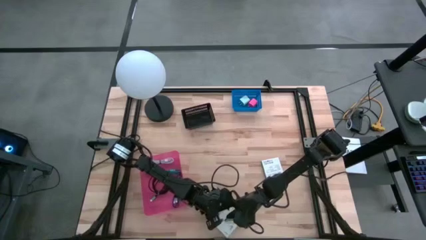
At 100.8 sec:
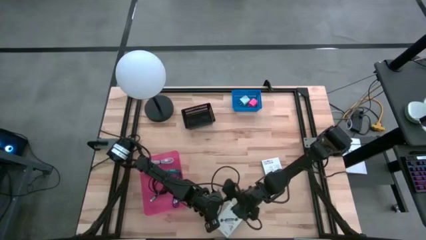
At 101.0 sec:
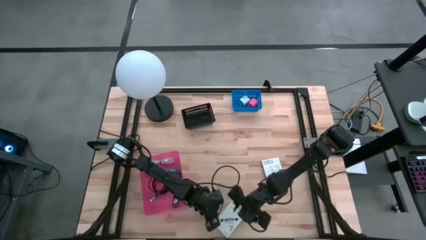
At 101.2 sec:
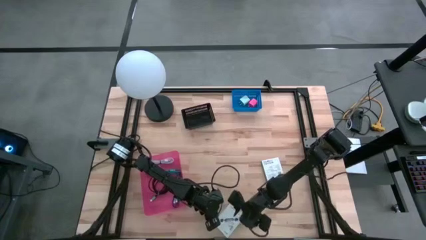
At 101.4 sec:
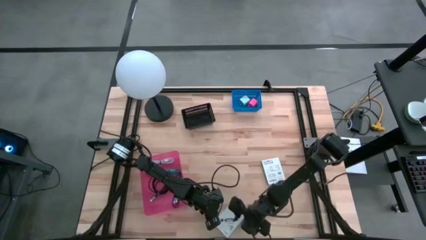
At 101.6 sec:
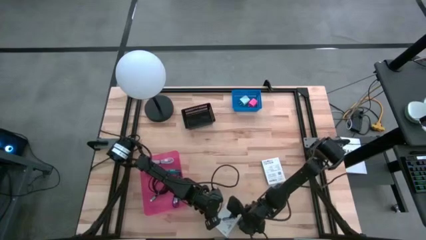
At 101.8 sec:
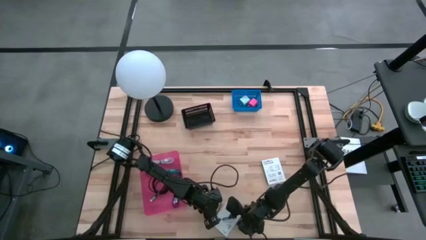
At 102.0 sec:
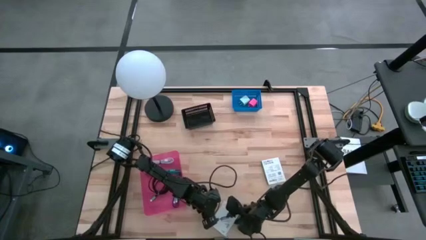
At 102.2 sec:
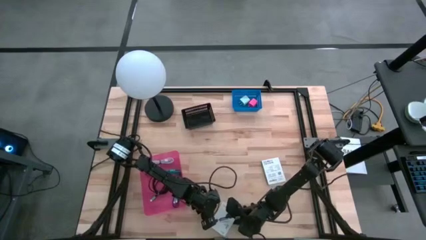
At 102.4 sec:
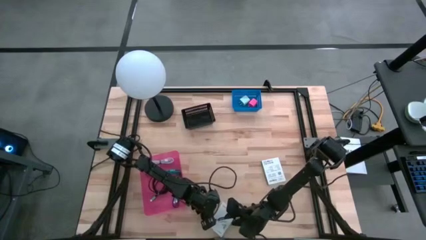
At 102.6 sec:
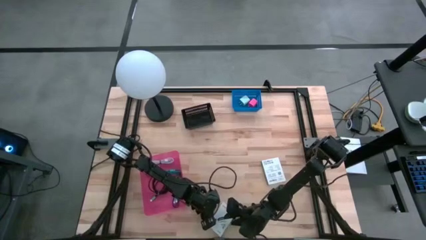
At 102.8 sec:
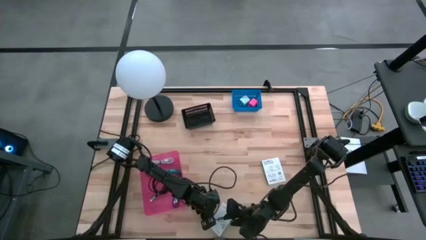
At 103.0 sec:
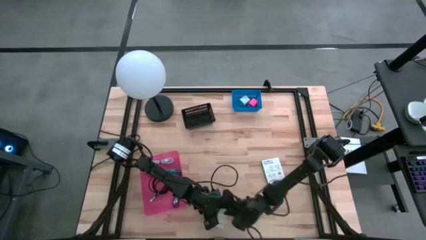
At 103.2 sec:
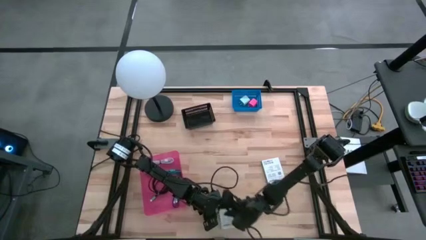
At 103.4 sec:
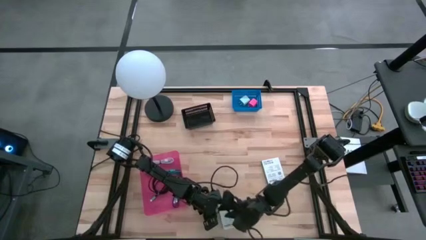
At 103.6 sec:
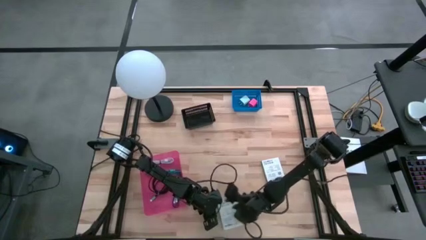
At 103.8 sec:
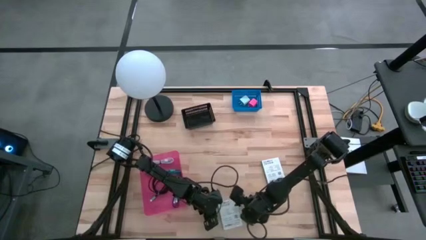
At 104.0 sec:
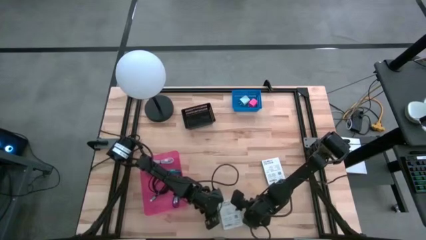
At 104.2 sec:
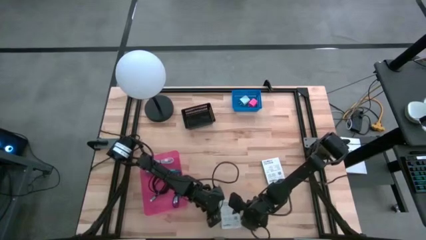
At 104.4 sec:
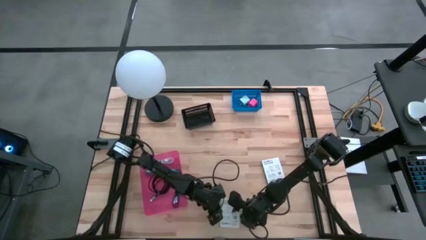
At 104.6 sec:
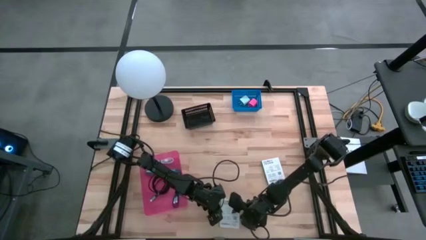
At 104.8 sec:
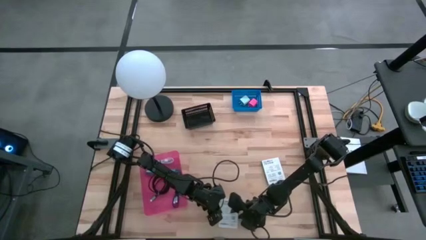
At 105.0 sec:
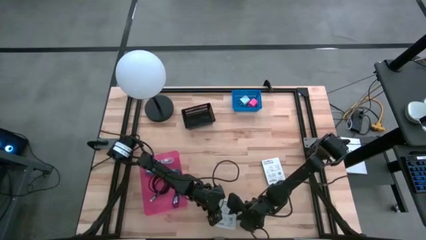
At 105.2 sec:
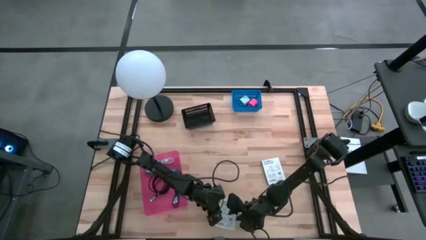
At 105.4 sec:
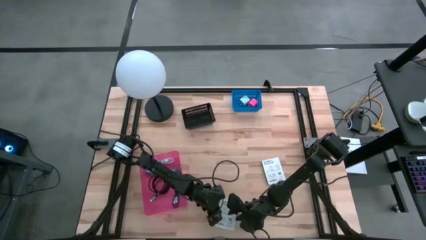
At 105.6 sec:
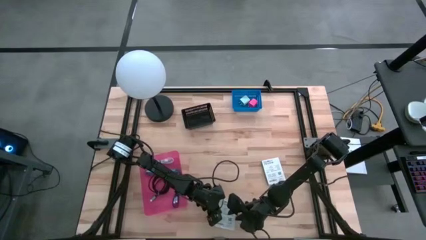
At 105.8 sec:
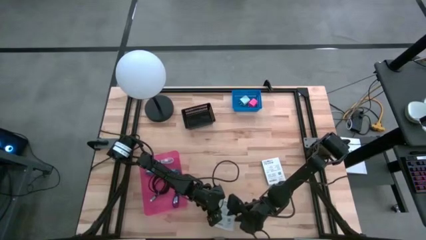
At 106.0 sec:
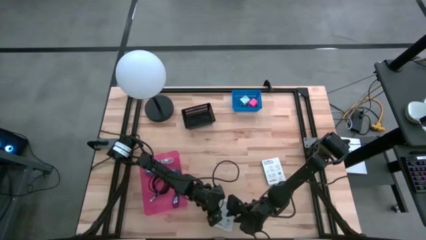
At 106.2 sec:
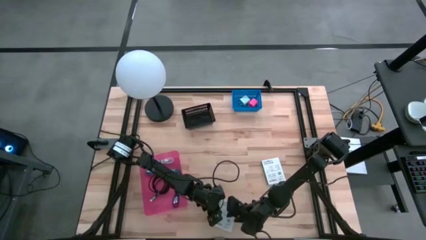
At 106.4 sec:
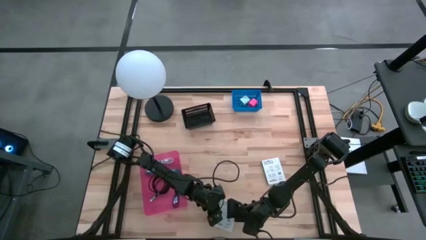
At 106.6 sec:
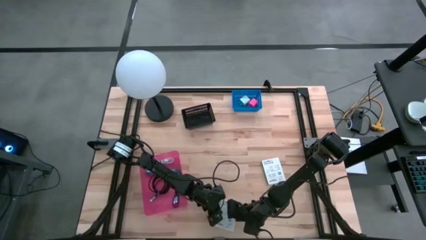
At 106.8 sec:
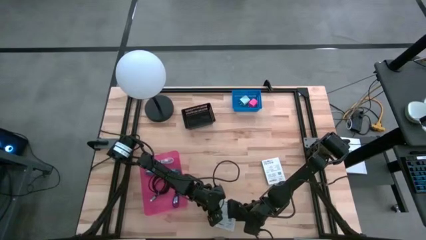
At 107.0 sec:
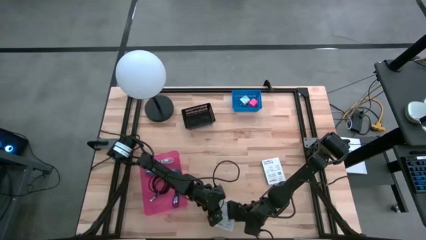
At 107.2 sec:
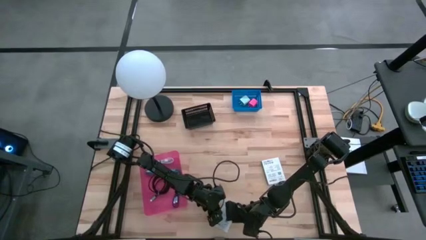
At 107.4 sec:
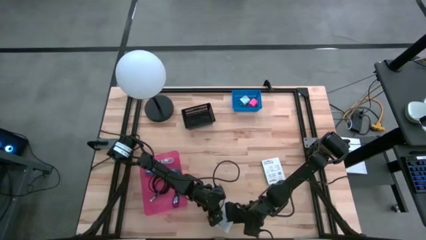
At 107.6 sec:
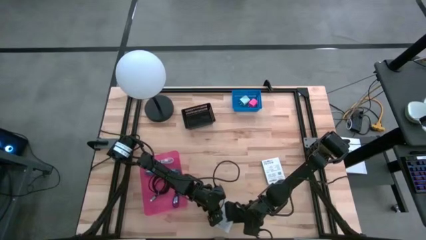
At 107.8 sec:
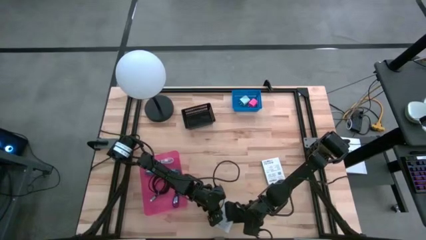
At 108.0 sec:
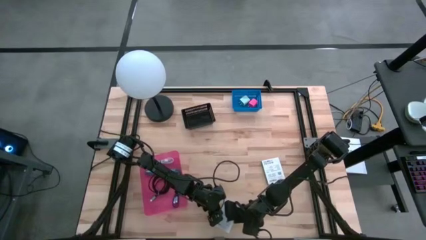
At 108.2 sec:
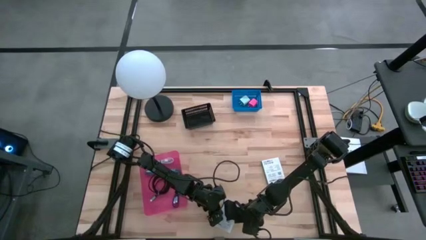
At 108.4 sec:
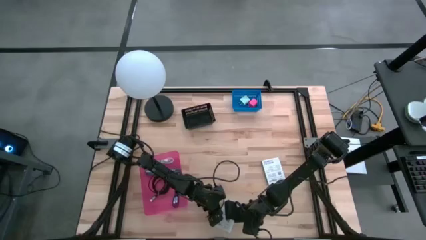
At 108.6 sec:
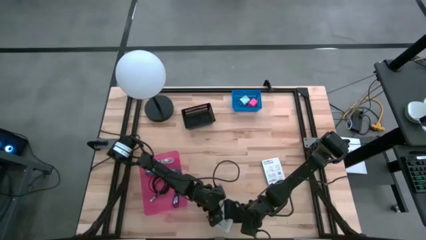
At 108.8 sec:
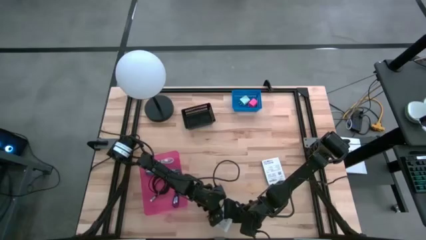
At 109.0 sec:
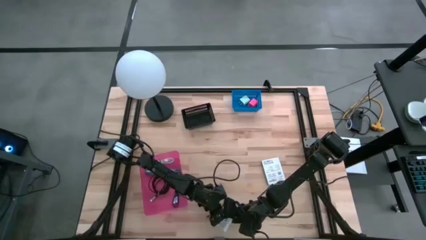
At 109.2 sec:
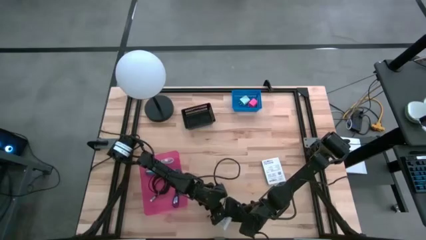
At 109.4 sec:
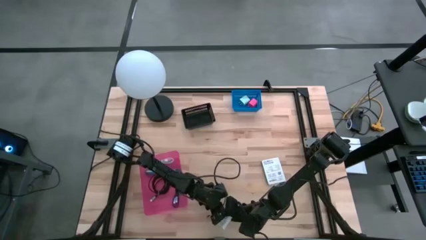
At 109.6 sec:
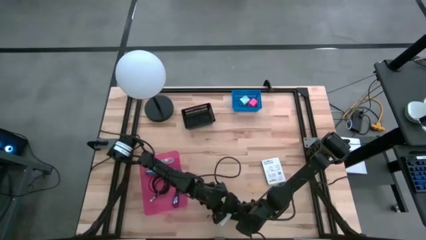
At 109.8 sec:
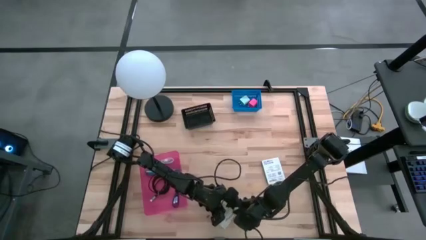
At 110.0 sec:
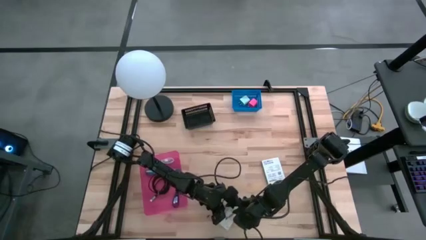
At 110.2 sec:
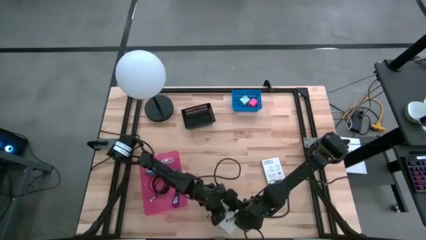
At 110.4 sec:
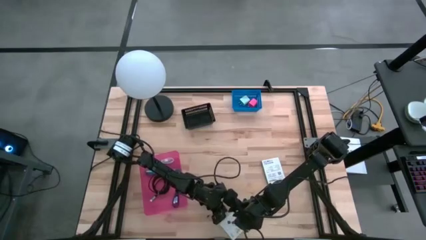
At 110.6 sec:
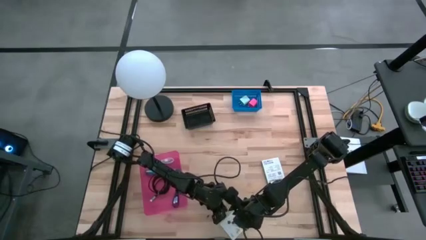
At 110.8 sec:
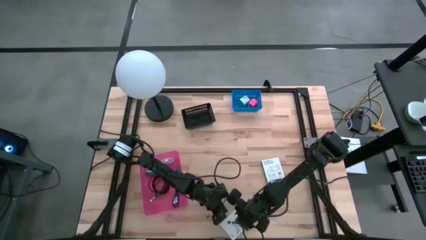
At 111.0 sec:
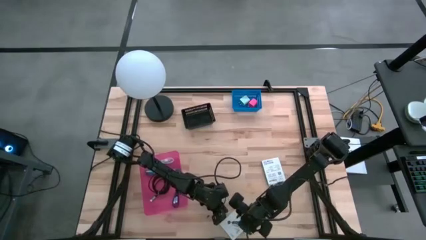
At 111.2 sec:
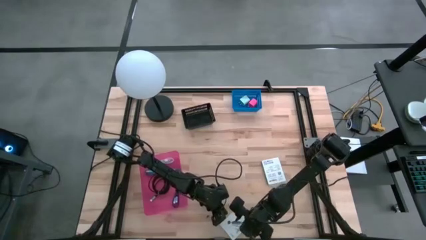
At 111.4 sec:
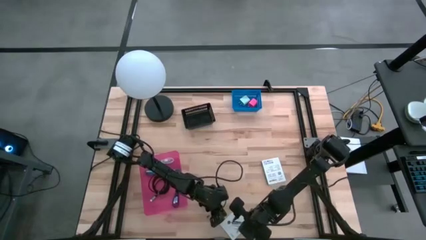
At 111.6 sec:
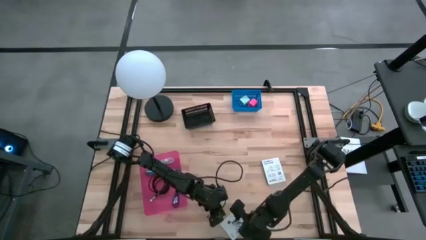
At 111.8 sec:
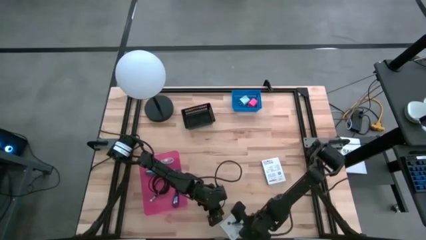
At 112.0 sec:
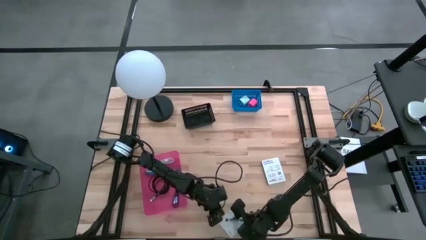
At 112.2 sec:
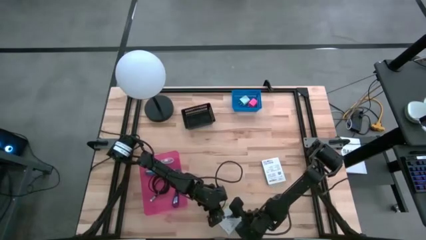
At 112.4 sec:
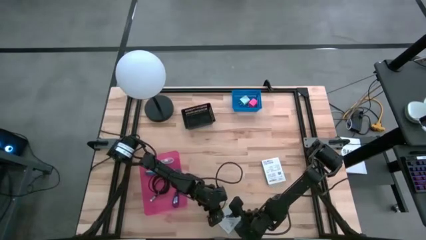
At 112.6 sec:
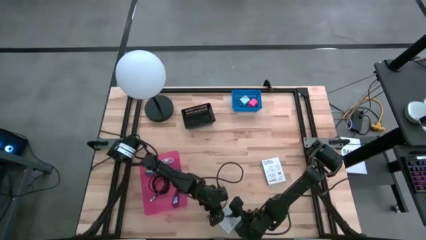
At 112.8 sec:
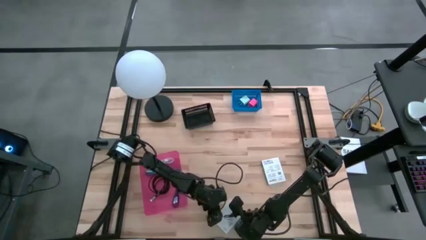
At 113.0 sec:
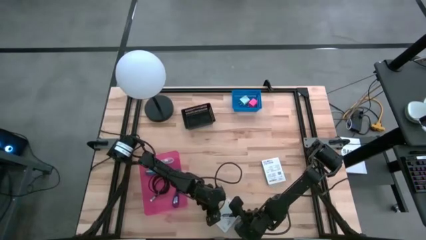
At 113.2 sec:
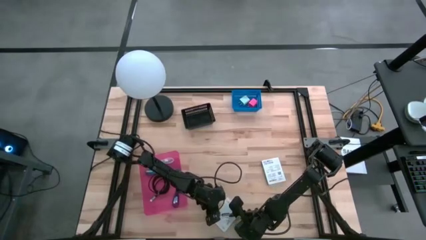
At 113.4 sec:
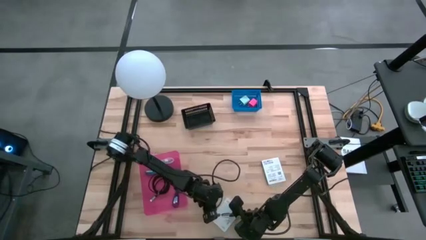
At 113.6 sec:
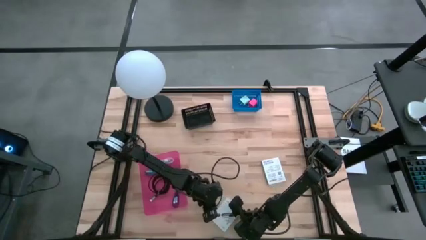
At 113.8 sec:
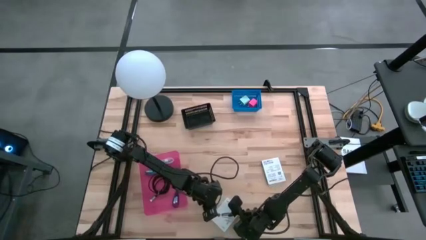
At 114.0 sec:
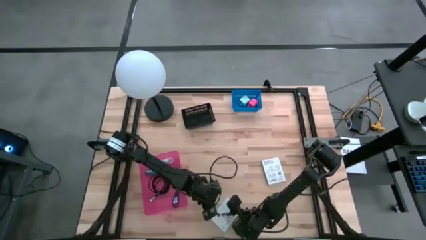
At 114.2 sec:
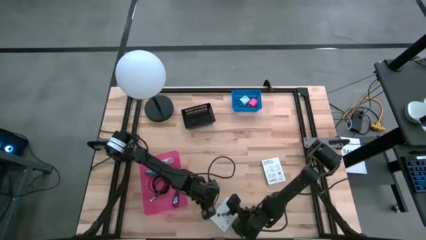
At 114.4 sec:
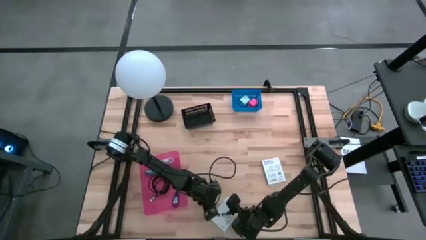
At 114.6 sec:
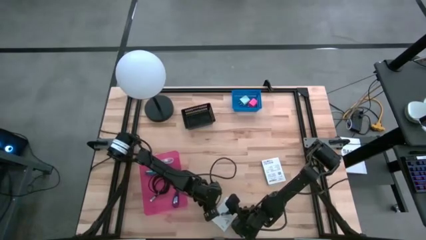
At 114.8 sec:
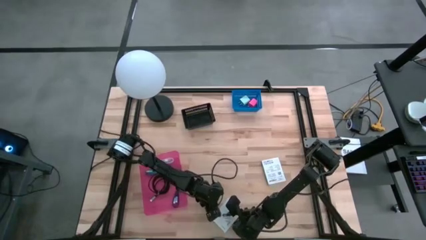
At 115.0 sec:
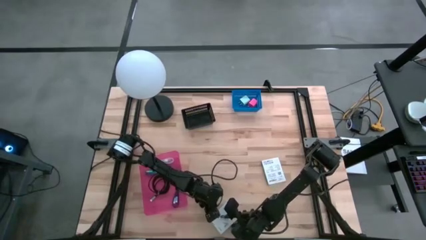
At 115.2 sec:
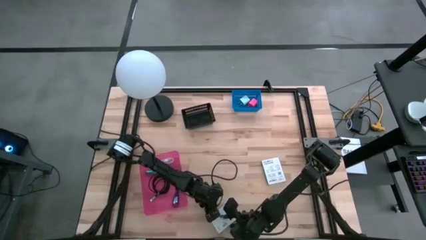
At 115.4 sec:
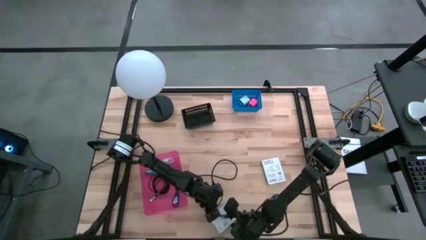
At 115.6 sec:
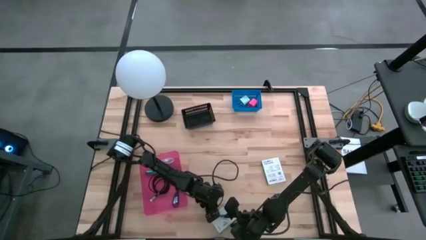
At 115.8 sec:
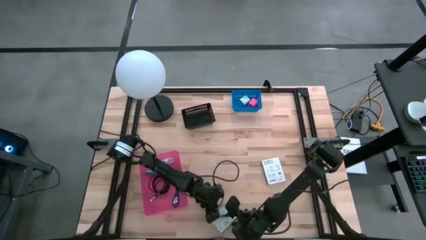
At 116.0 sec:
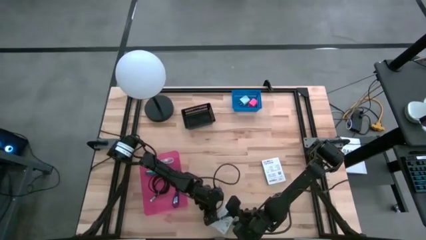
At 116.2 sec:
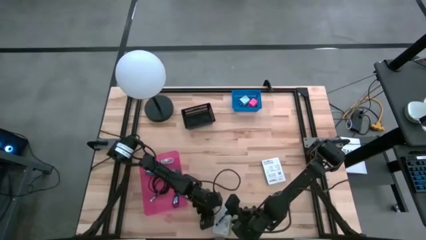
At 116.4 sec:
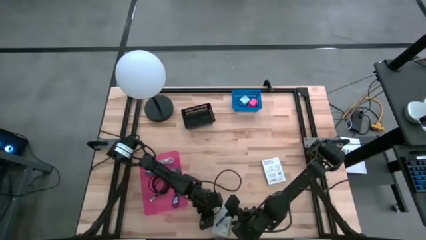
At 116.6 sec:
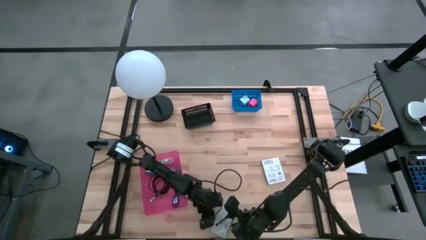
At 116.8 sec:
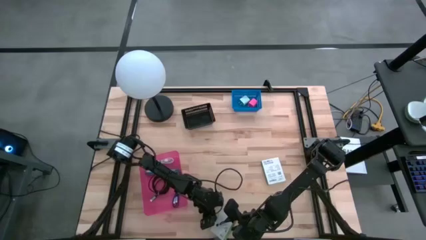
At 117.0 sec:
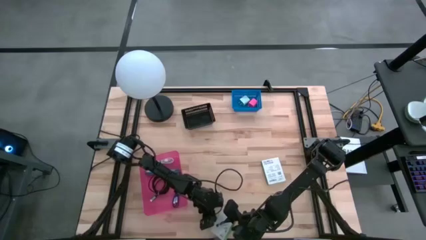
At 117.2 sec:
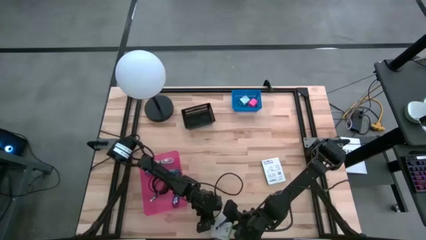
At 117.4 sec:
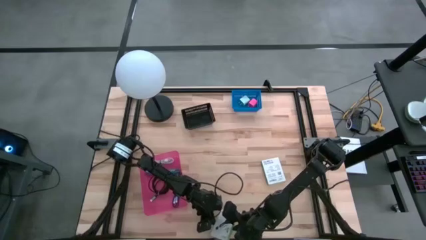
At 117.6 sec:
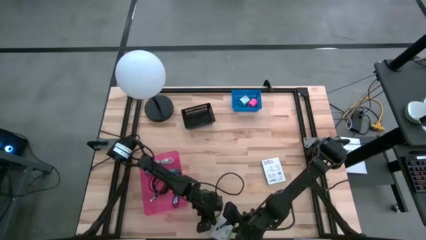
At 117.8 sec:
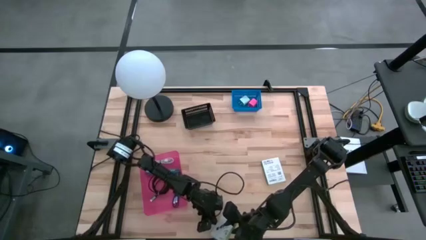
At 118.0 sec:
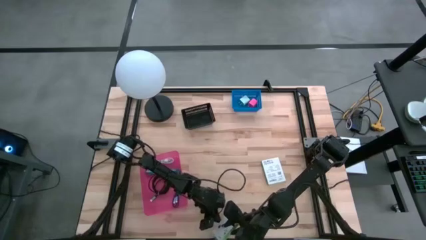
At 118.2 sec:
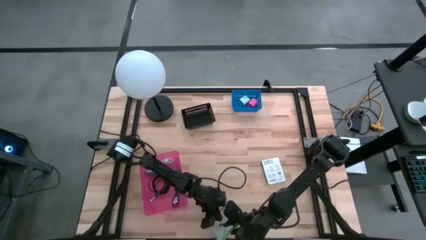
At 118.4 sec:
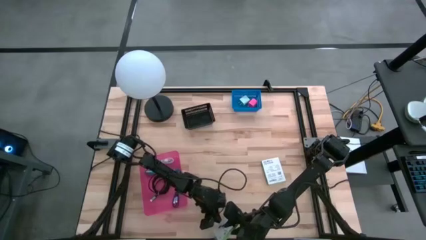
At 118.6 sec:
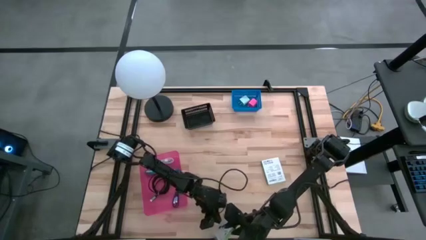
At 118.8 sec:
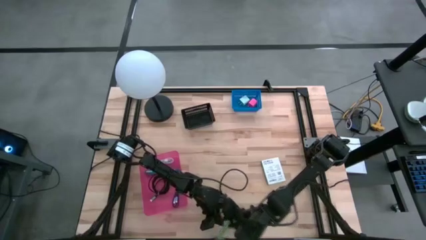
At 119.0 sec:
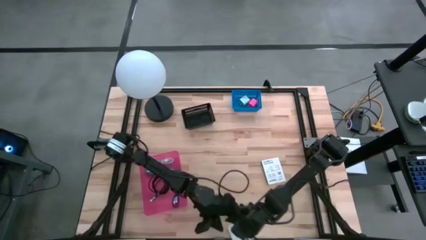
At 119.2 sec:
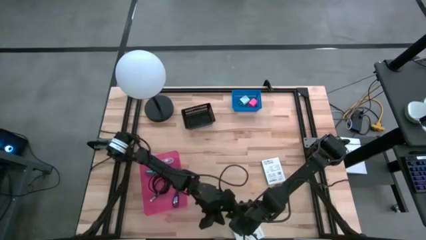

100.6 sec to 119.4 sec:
Task: Pick and place items into bin
Put the bottom card reader box into the black bin
